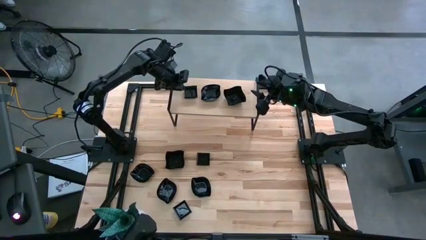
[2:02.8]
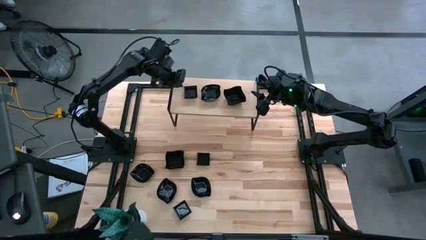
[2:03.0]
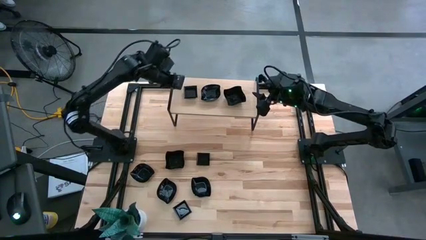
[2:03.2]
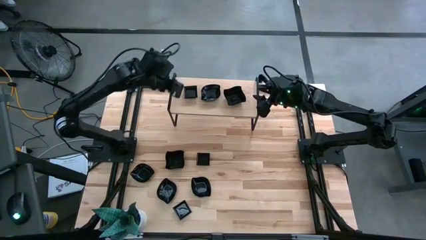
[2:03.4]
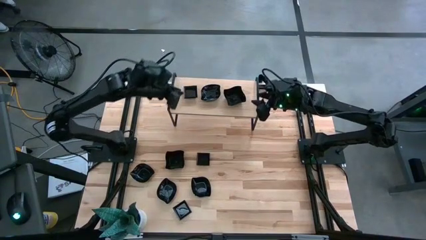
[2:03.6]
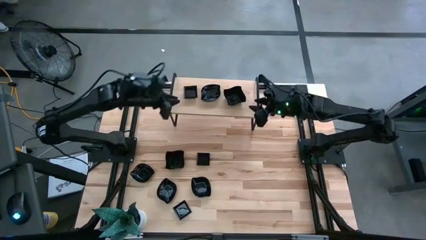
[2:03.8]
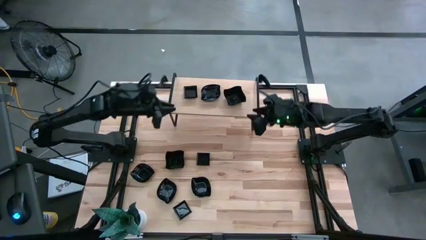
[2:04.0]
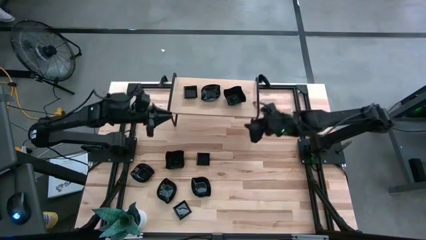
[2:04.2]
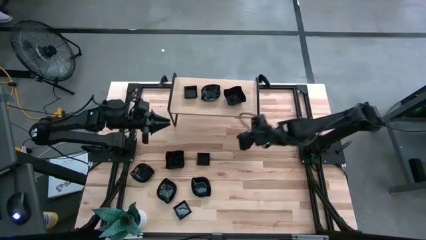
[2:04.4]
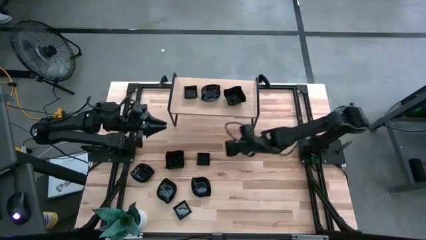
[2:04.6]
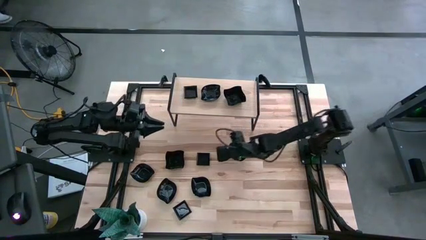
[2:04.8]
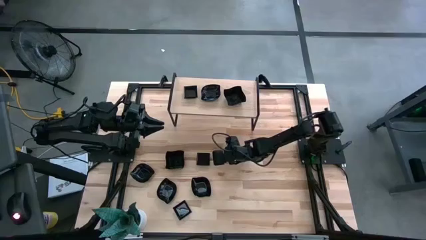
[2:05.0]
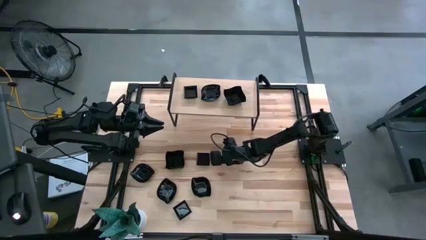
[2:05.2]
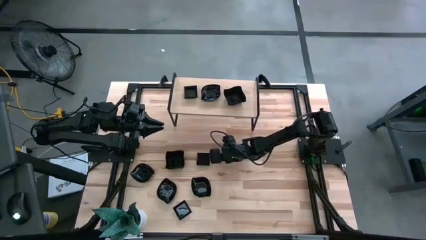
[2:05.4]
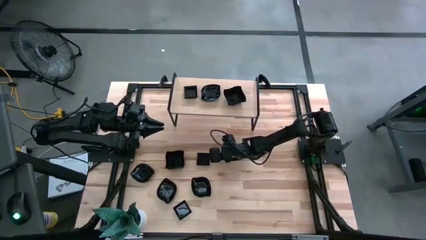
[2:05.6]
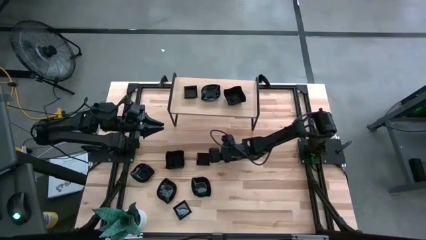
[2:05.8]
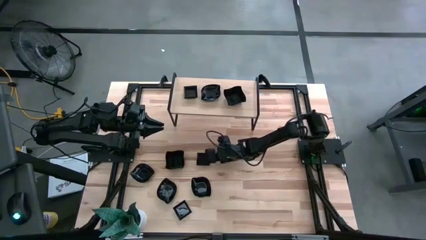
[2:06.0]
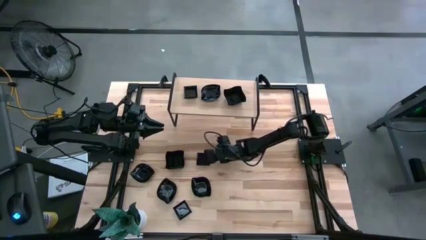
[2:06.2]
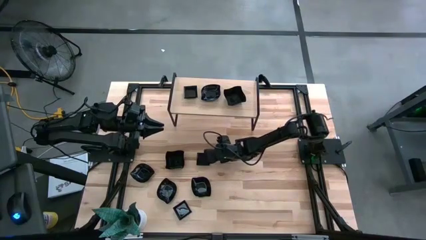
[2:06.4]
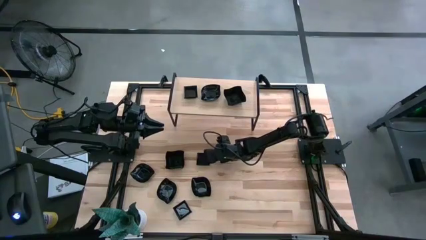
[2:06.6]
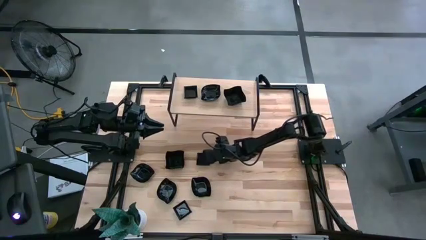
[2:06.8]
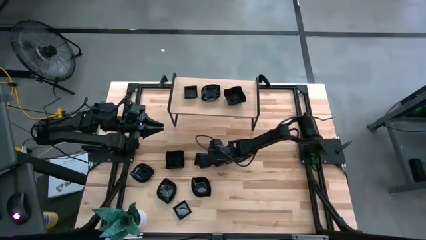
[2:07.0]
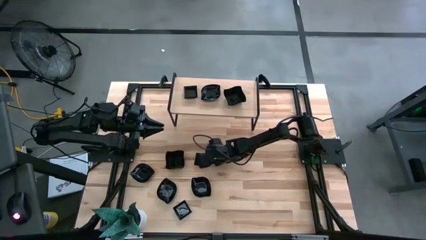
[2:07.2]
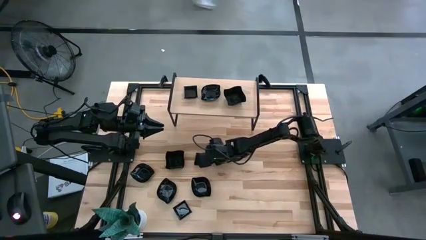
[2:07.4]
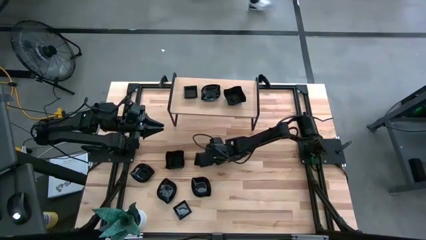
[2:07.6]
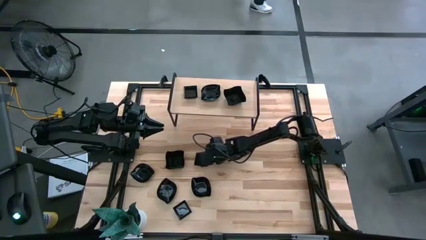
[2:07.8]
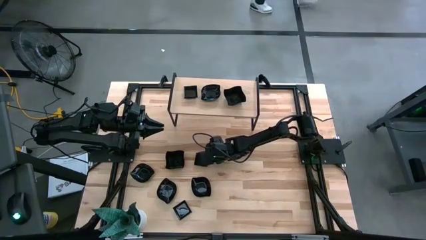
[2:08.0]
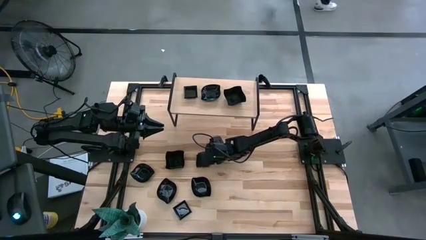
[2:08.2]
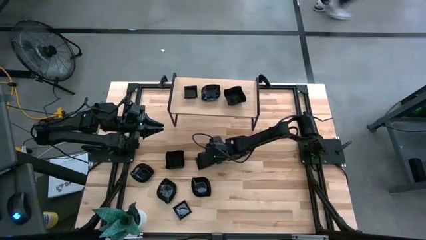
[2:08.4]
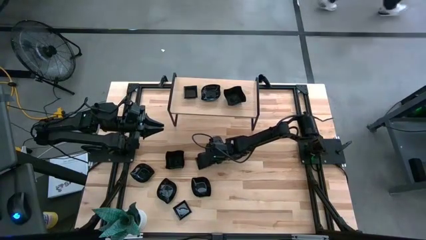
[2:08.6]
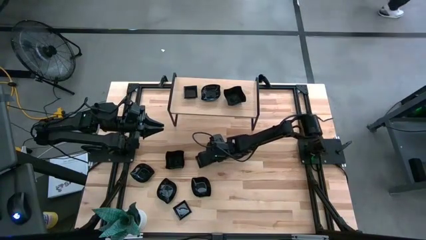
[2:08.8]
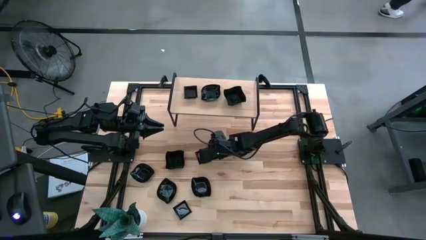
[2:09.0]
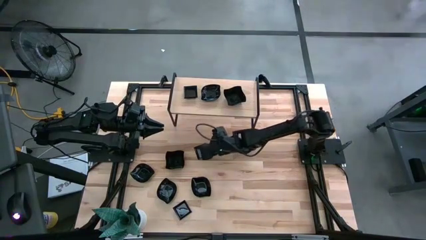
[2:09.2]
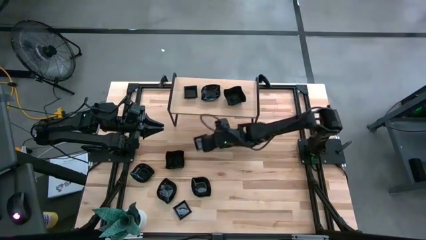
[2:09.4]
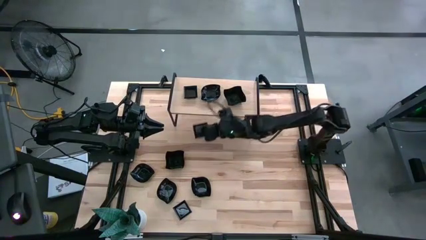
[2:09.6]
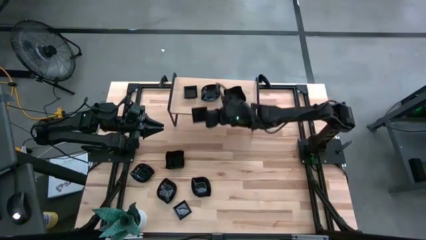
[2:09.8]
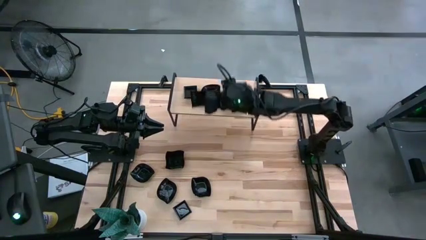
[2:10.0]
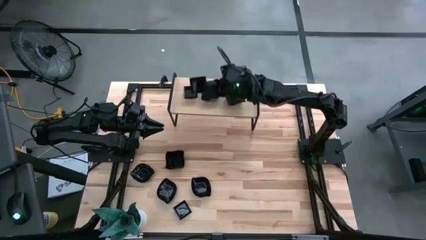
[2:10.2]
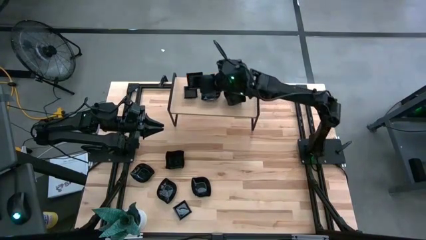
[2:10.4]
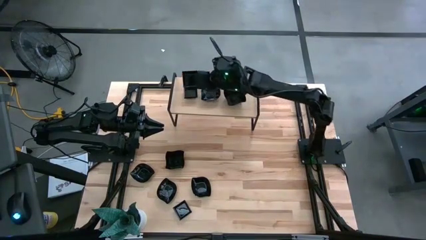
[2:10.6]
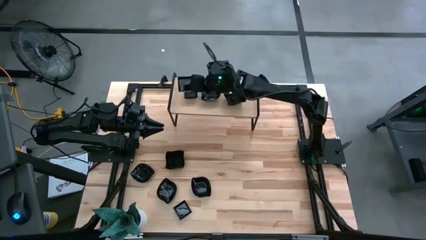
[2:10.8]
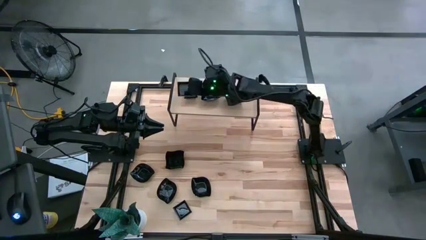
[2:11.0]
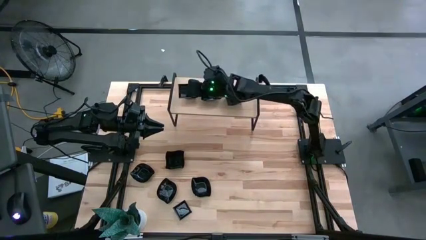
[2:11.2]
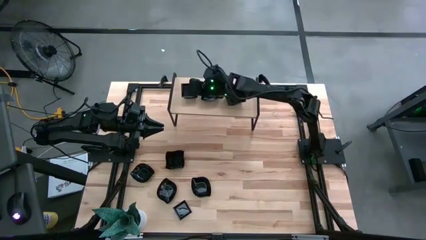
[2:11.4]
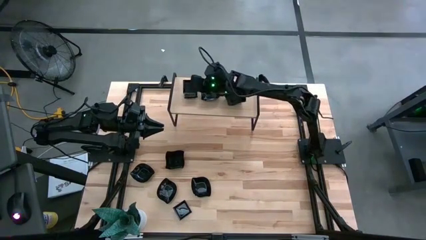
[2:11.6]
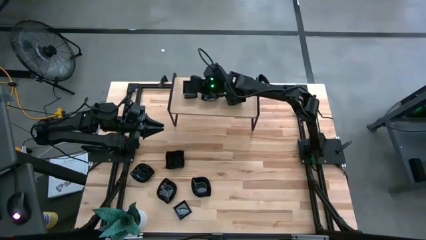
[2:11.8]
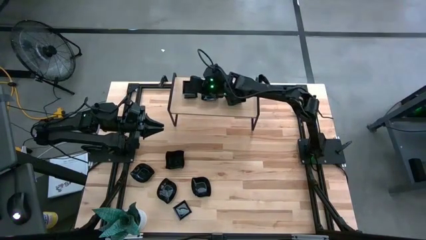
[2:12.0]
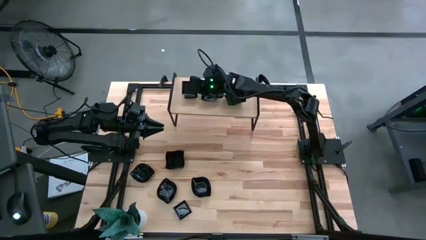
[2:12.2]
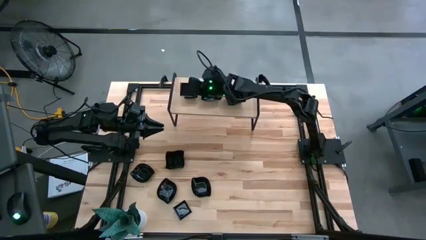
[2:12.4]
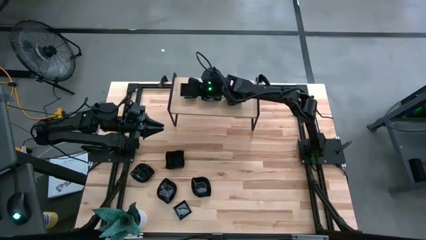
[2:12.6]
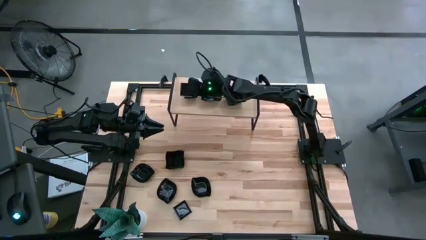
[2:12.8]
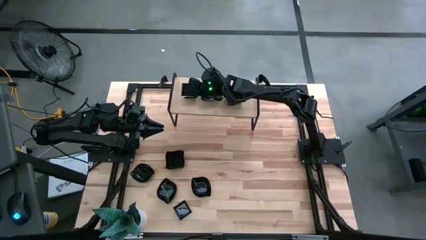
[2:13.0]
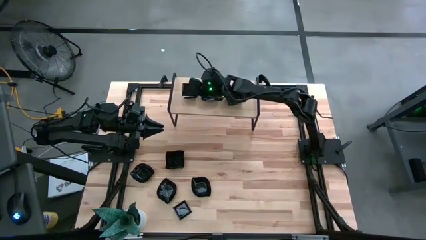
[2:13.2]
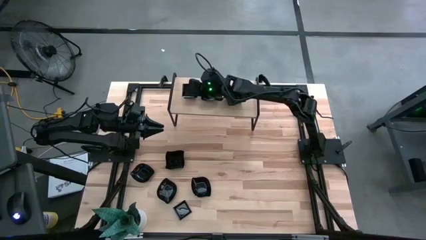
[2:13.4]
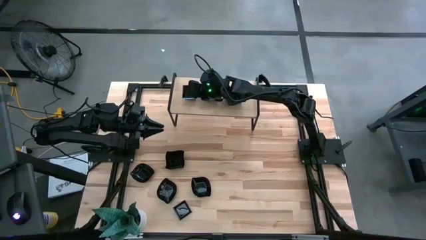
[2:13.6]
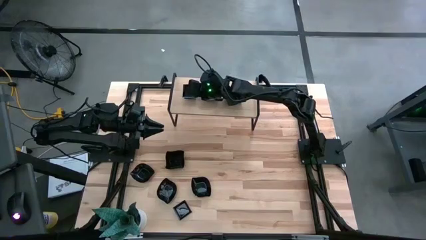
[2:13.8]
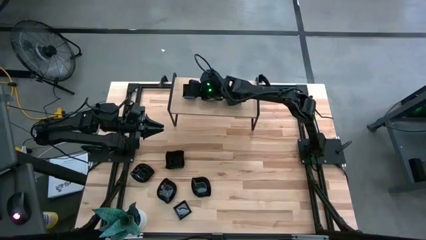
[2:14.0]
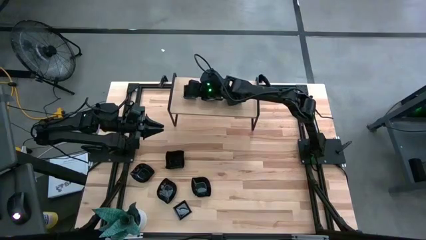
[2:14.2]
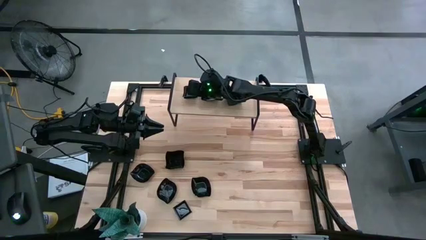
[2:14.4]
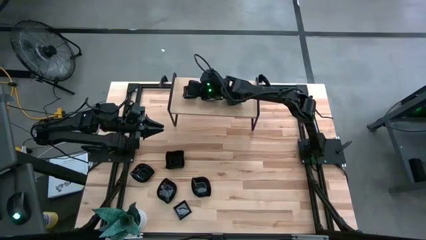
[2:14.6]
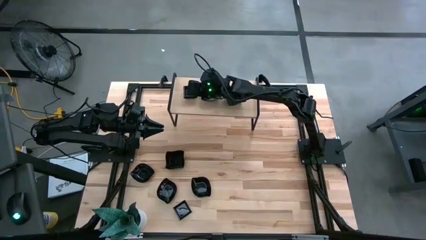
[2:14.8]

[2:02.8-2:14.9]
Task: Pick & Place Mini shaped plates
Stack the square-shaped plate on the square-shaped plate
